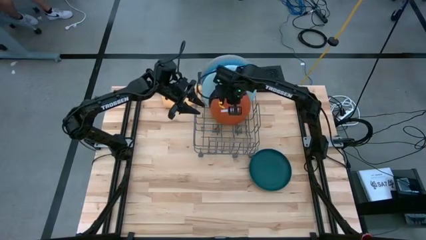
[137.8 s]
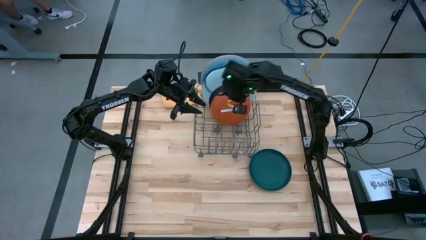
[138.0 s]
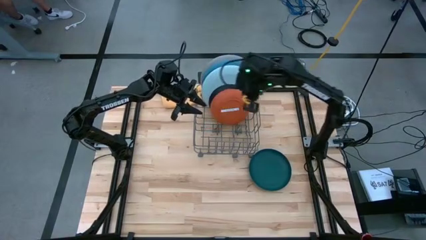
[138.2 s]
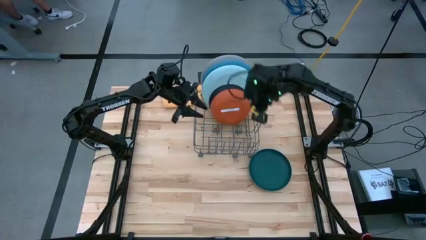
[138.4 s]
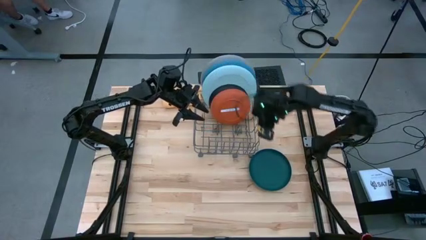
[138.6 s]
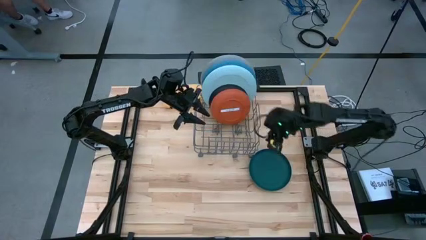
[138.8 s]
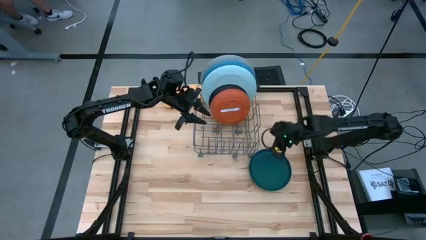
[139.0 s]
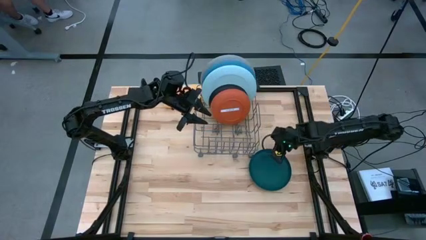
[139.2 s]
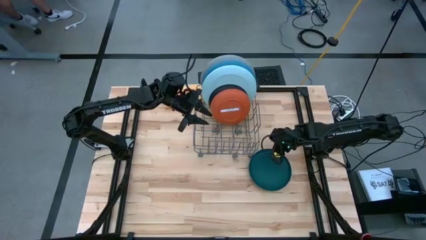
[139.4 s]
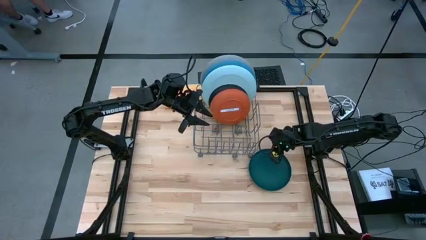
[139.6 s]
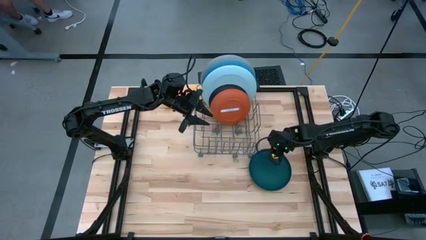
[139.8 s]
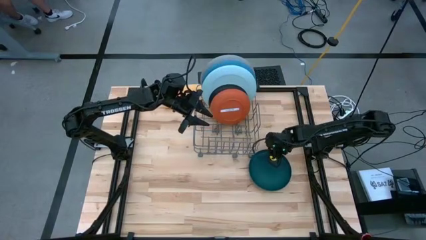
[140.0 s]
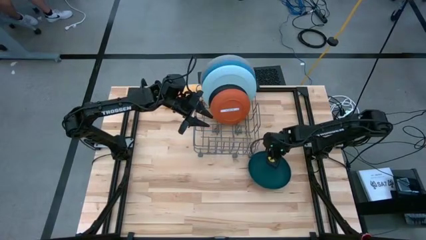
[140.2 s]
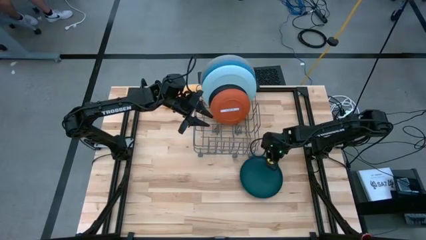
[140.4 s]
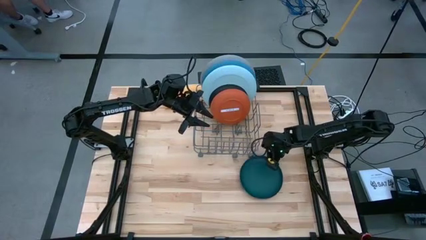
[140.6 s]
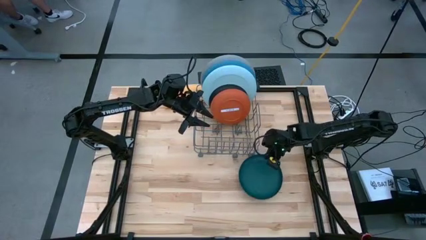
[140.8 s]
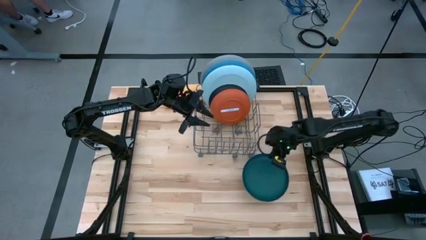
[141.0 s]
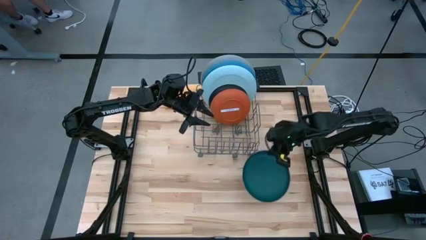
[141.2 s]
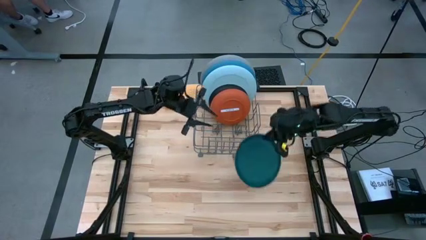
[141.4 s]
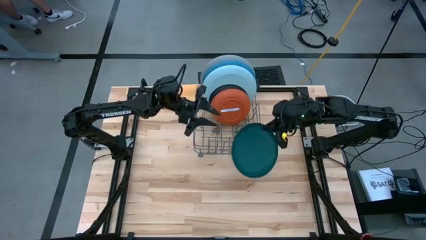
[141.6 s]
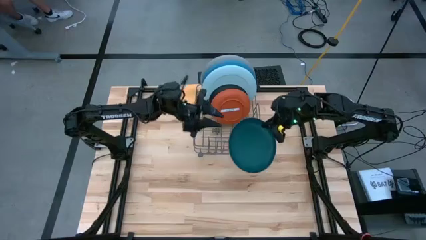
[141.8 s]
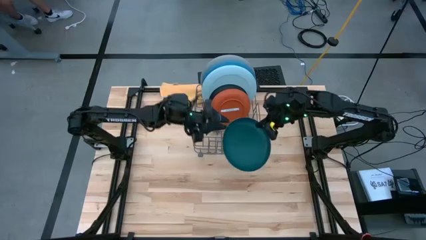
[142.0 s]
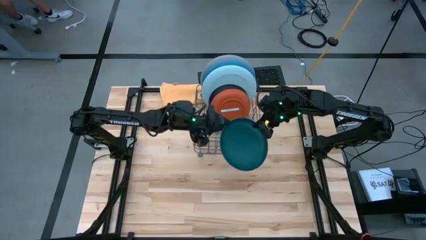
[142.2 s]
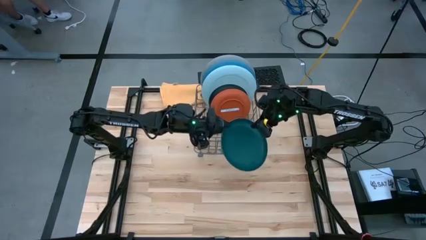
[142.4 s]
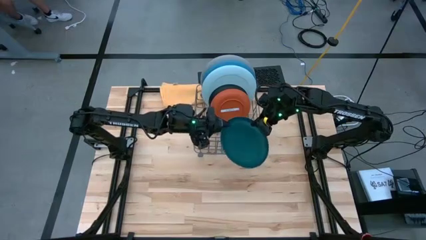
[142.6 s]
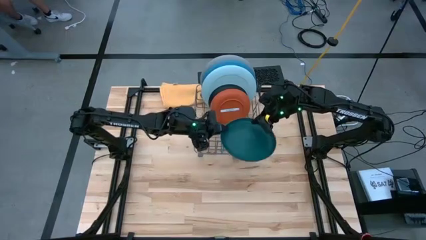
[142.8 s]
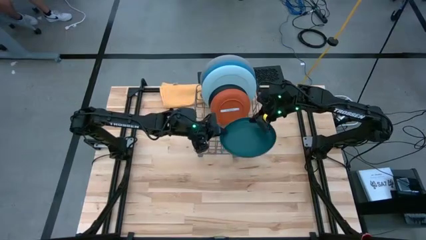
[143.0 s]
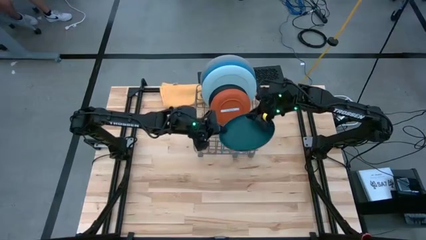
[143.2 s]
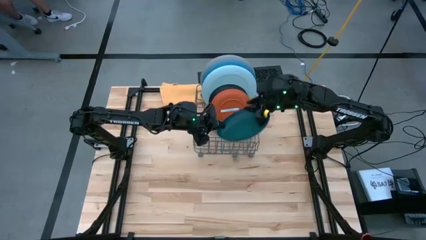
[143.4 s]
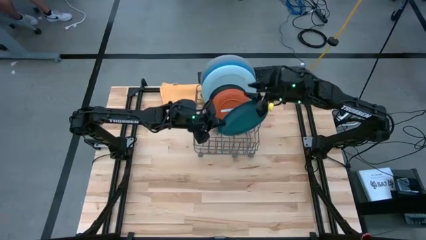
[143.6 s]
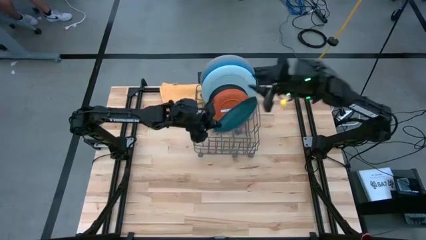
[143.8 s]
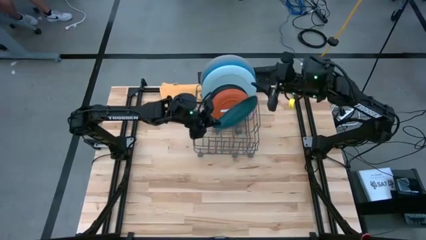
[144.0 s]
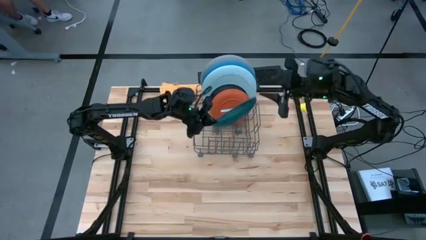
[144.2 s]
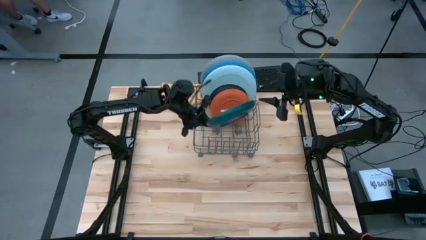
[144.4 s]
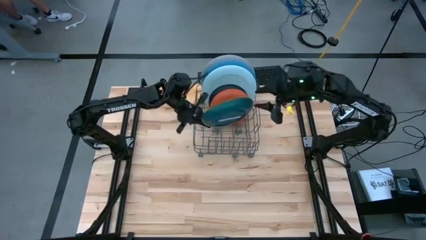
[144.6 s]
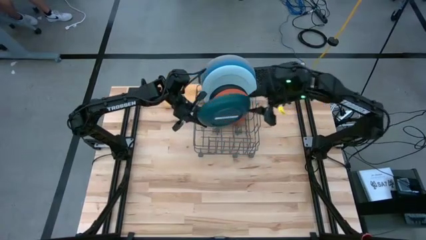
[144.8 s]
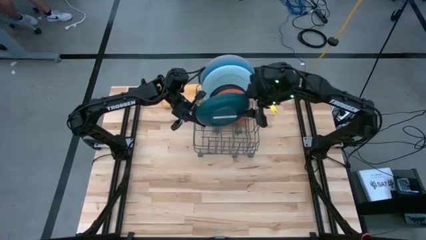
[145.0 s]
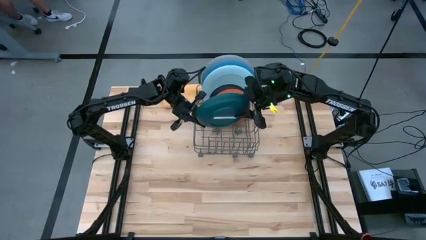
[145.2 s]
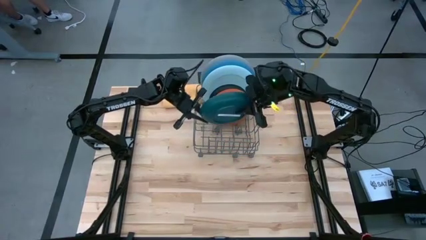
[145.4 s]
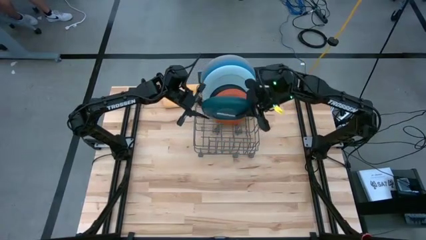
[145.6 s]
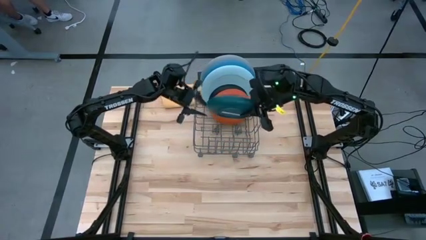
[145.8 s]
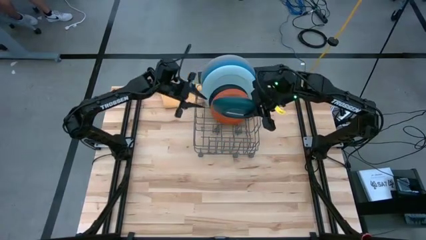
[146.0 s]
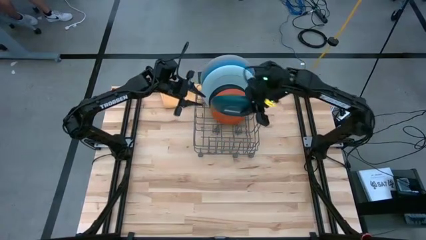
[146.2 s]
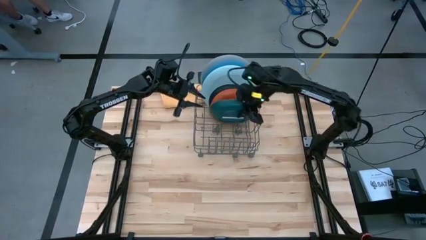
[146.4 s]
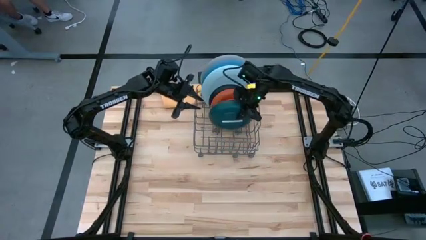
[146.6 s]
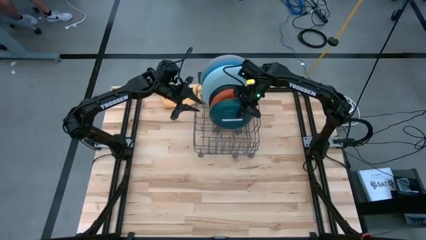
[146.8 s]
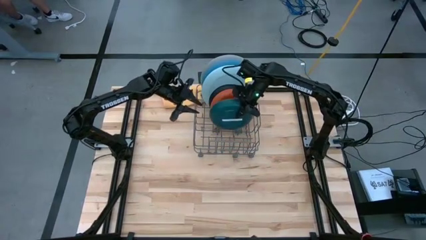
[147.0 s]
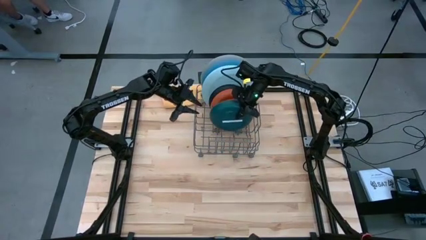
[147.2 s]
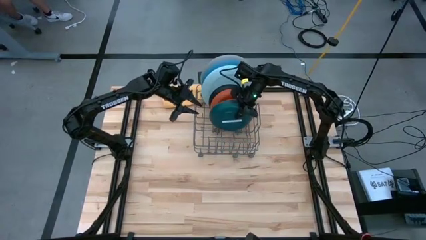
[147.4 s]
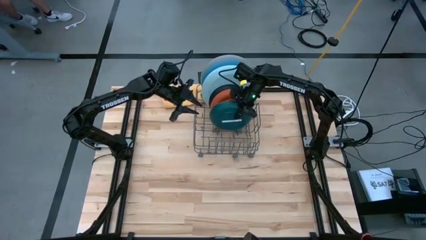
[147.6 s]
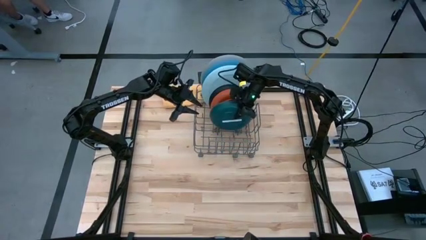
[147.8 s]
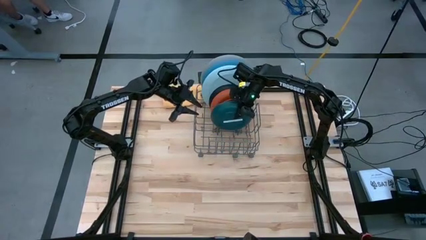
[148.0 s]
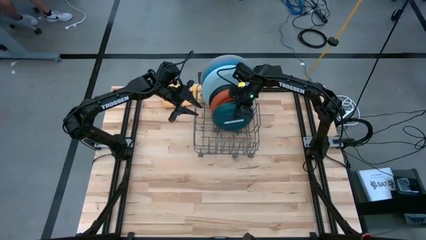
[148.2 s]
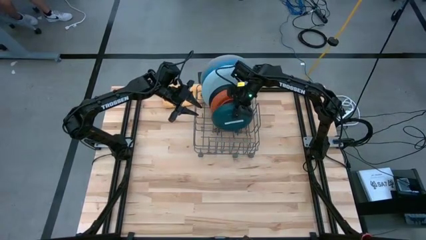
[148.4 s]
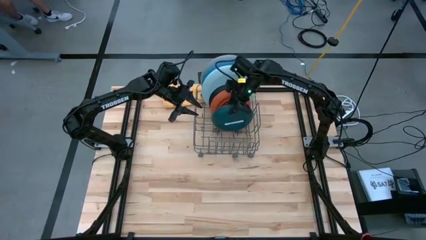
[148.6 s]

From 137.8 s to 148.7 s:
Task: Sort dishes
Put the green plate into the dish rack

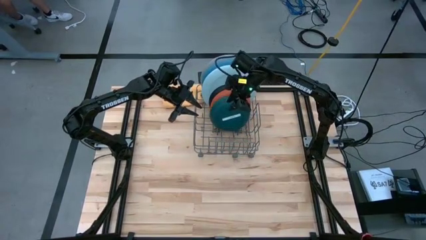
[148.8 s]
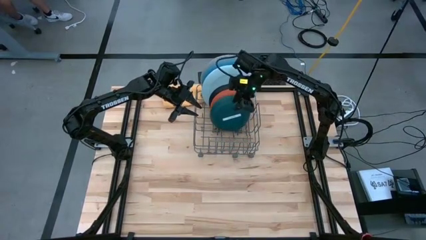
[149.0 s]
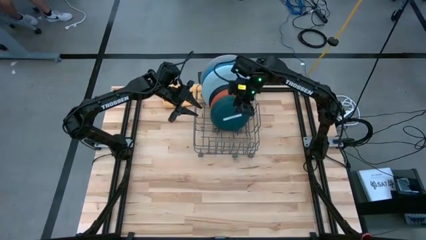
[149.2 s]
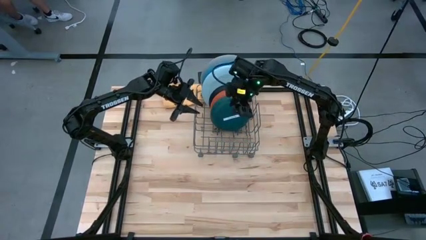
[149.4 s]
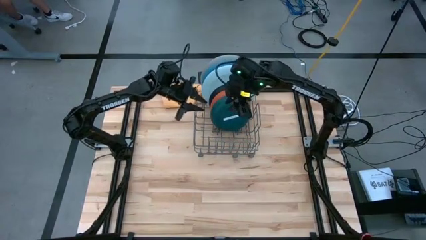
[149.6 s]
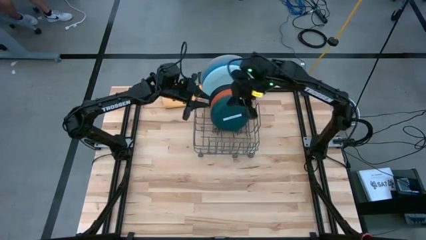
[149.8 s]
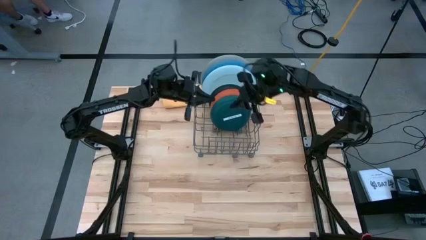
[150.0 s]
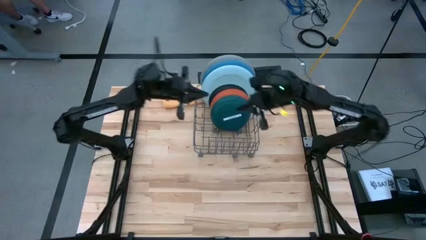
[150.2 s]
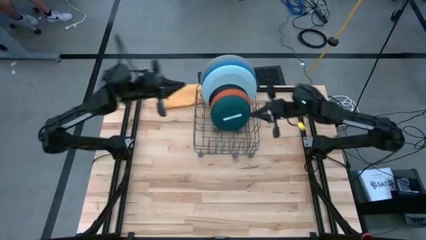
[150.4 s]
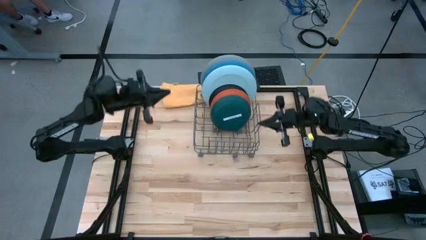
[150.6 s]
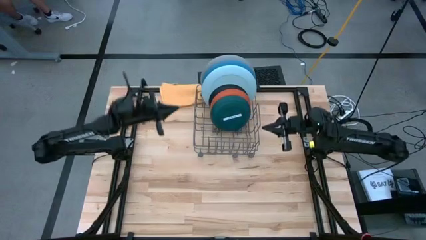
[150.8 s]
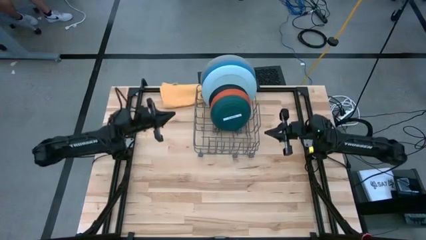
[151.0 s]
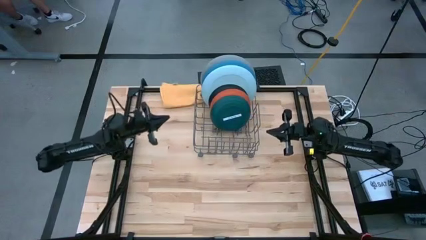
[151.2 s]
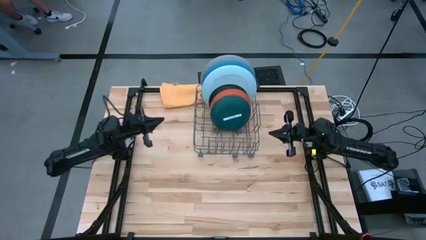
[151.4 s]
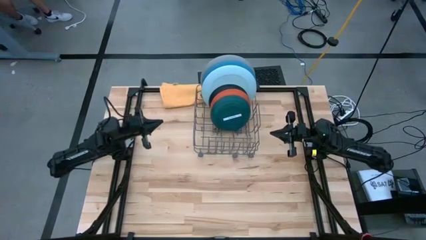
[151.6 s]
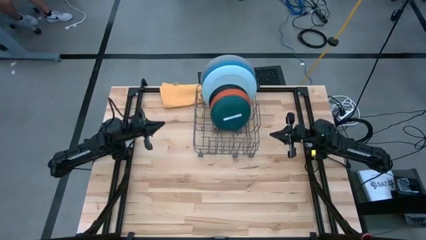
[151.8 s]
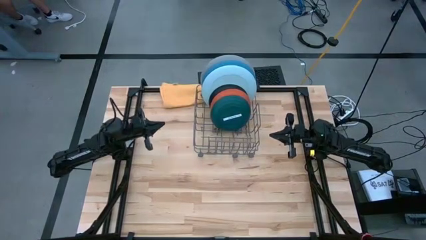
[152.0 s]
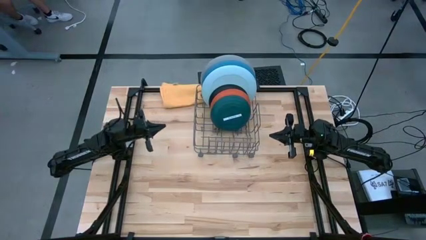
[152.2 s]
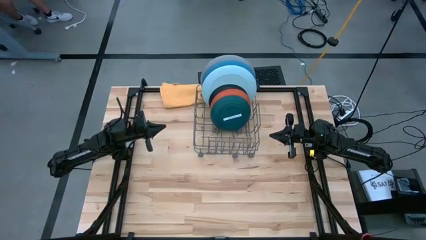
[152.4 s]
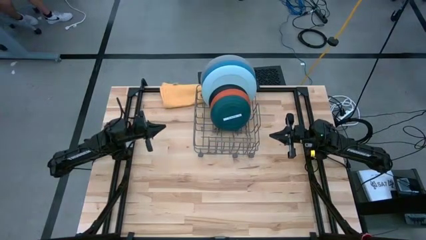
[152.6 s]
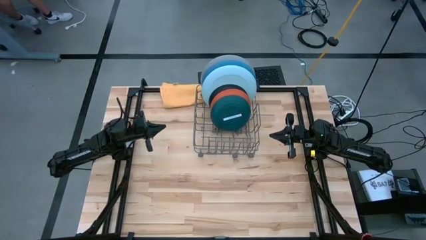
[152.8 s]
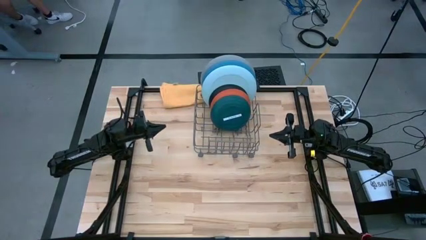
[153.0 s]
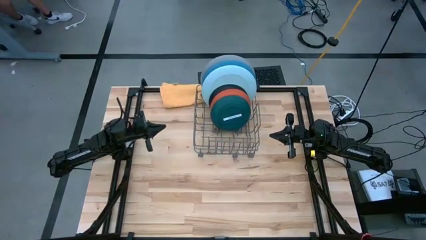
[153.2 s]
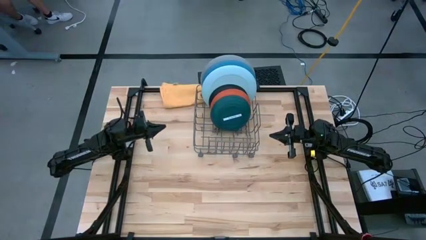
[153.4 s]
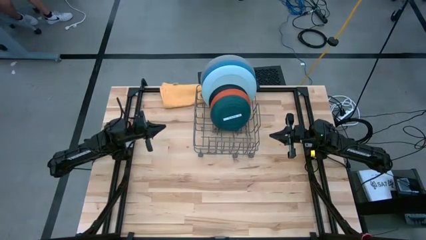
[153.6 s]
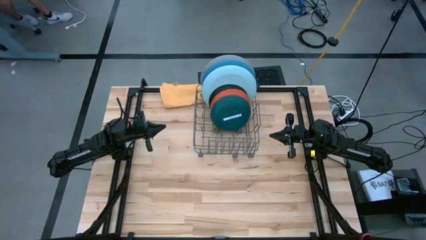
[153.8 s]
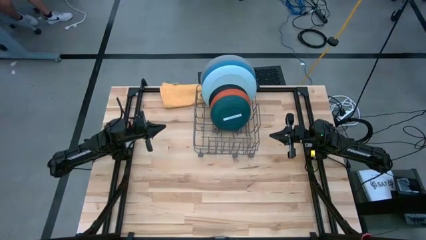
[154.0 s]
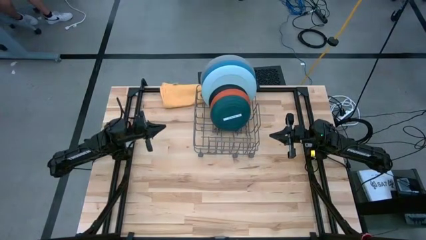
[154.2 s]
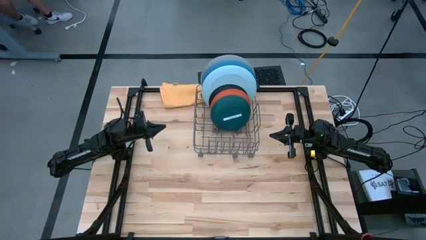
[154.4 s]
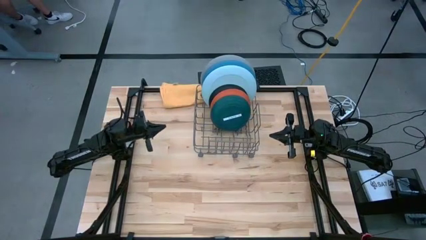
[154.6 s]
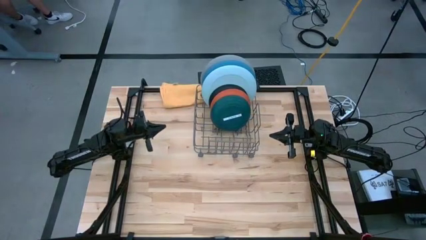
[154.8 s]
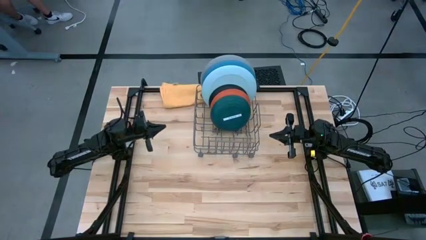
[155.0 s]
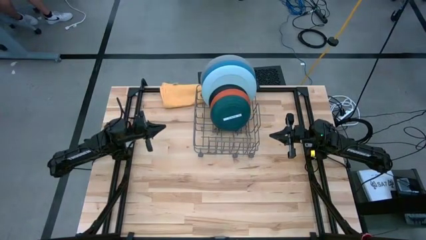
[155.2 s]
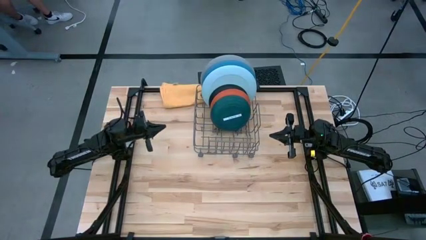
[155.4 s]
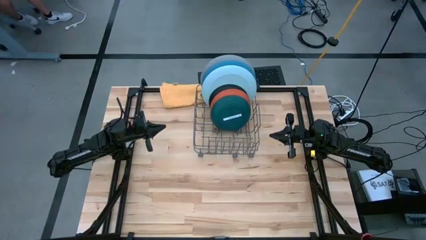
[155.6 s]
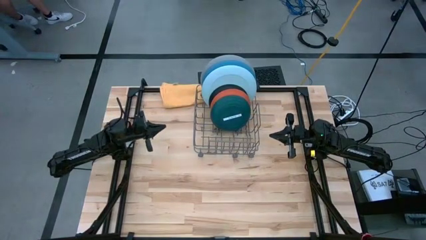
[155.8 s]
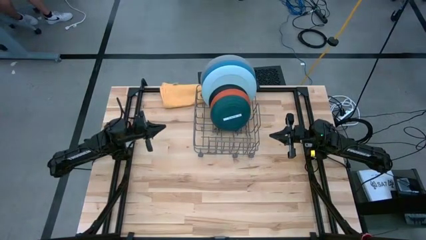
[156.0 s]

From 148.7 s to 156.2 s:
Return to Home Position
